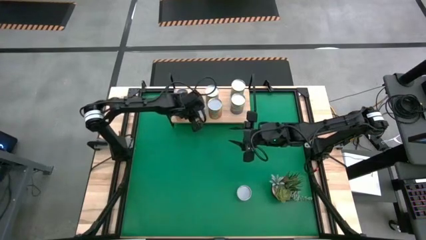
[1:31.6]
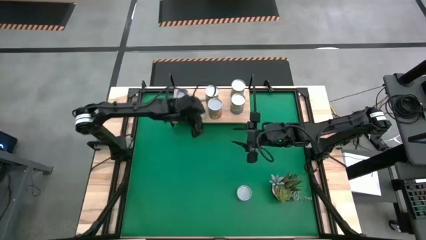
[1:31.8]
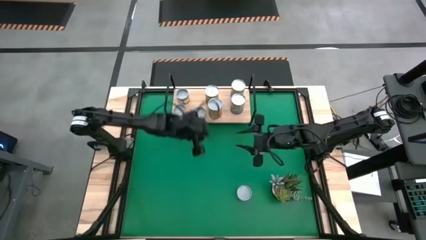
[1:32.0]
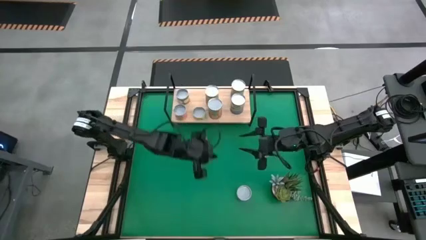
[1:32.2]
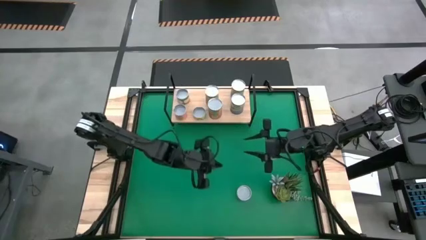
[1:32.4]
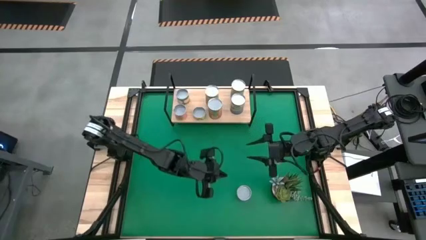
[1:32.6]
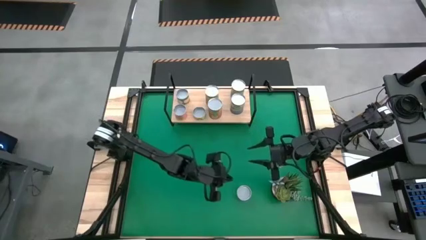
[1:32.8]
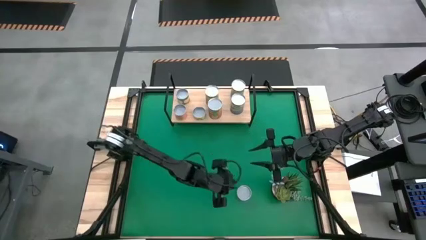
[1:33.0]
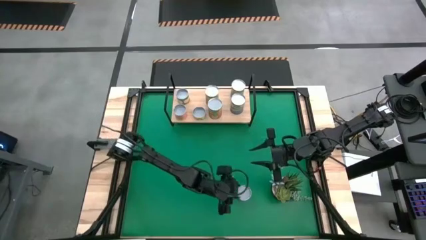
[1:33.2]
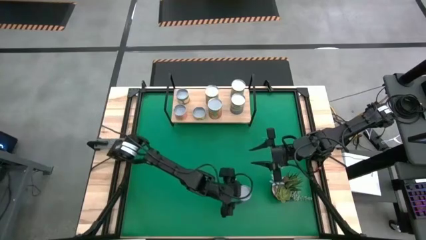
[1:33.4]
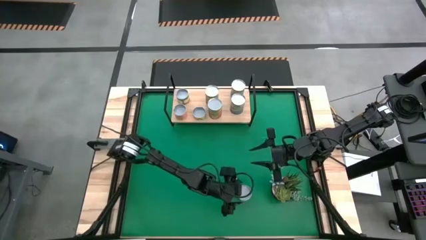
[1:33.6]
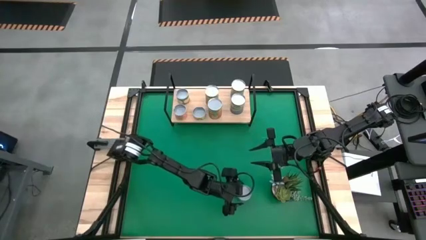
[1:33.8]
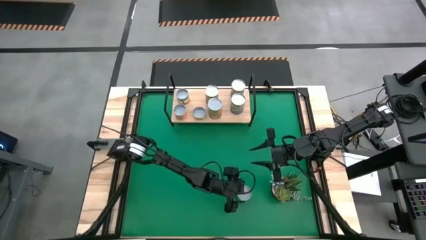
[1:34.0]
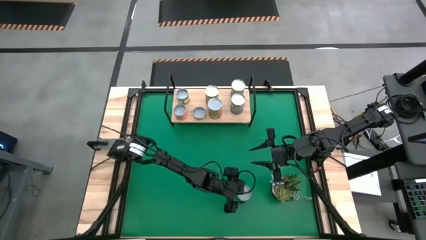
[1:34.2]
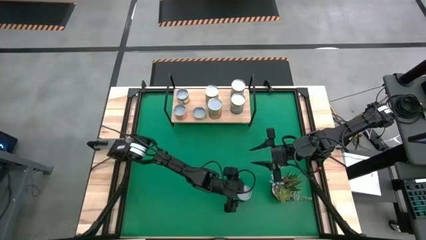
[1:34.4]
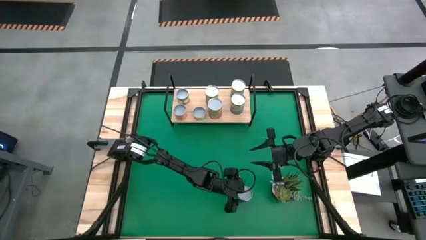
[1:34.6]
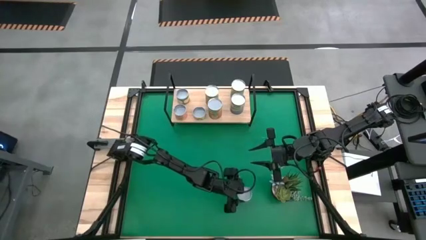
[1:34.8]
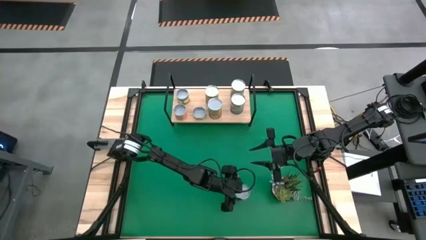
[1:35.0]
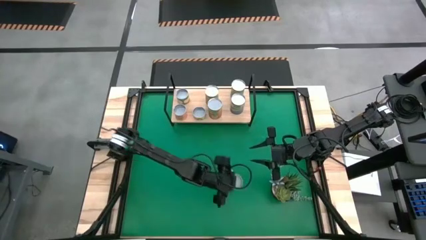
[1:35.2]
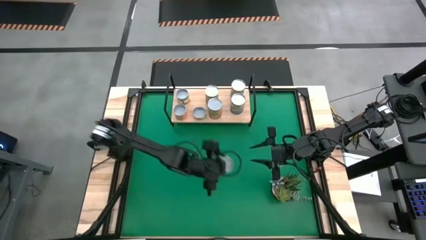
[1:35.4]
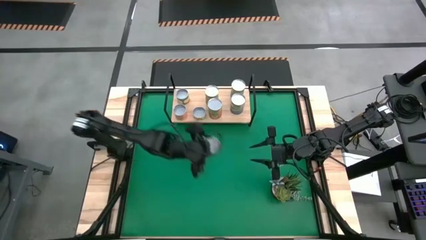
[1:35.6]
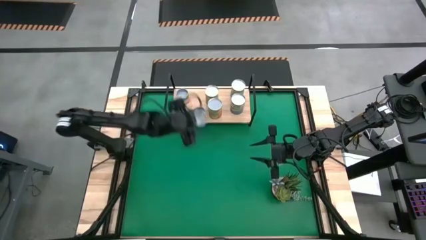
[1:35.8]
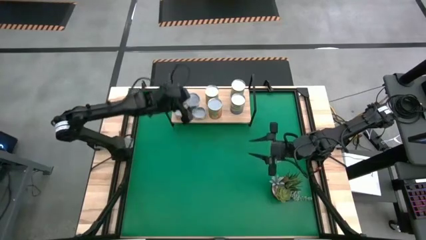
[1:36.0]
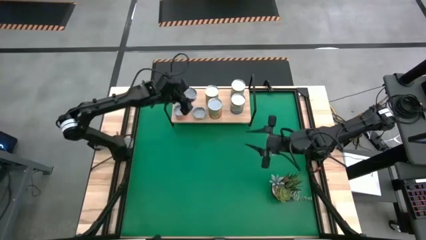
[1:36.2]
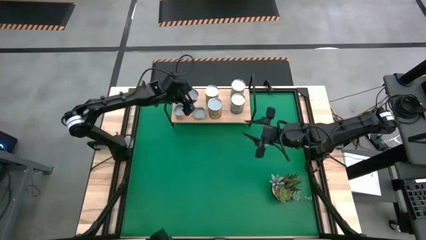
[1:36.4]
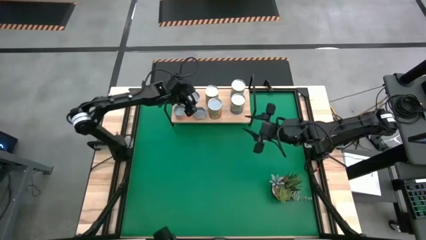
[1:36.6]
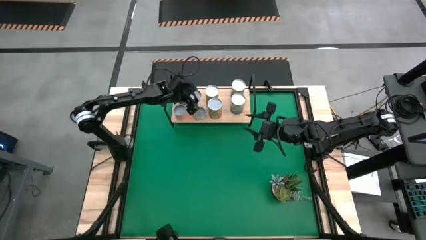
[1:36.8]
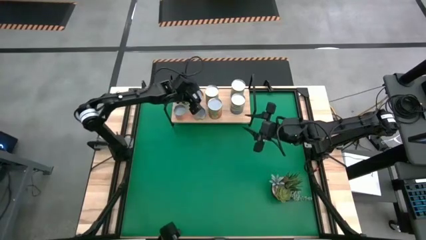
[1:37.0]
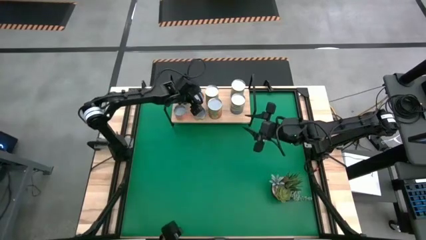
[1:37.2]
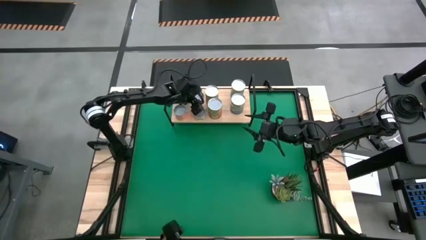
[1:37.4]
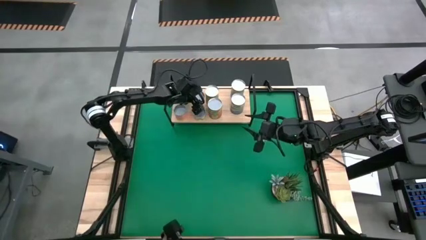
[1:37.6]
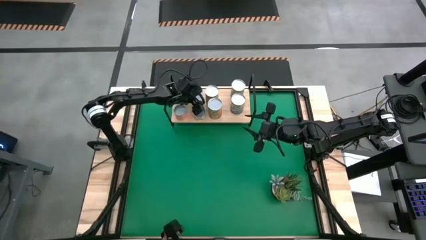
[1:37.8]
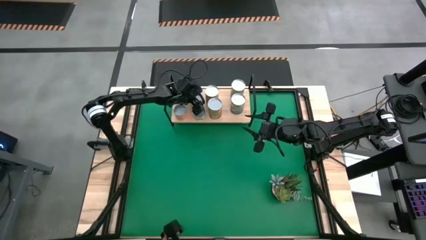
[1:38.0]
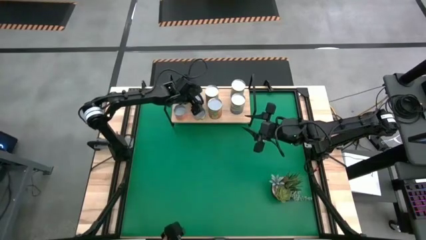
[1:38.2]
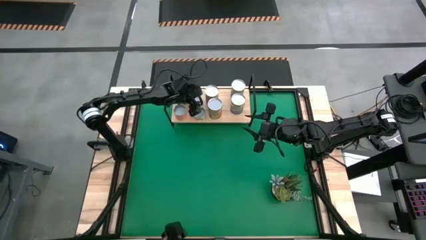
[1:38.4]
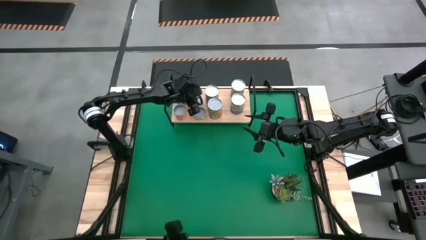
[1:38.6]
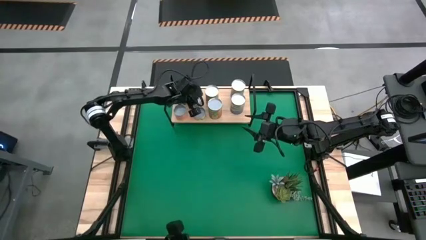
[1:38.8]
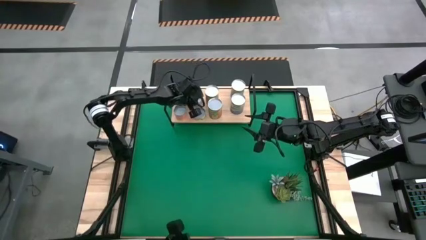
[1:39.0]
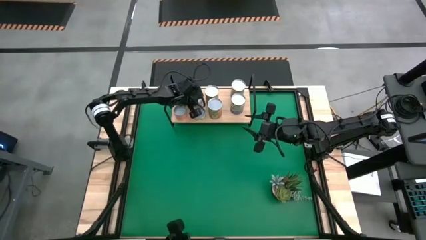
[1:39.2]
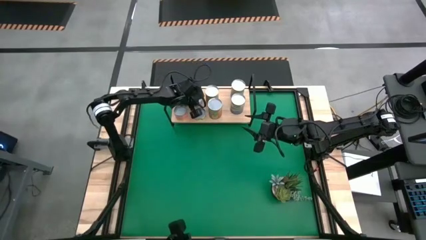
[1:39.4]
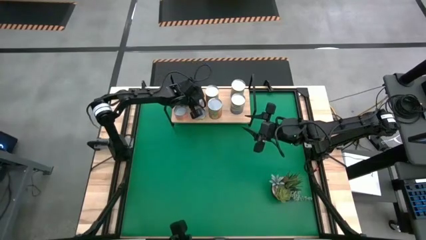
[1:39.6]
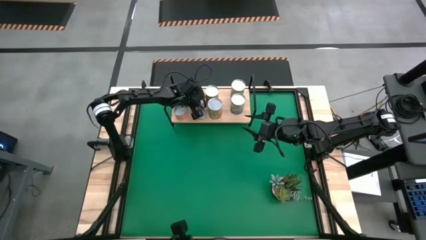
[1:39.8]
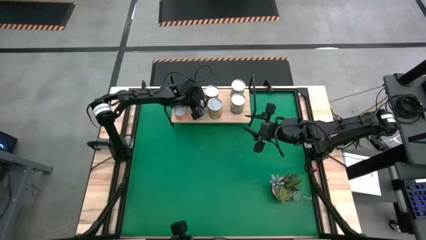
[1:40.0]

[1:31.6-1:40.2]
Task: Pick and place cans onto a shelf
Put the canned salmon on the shelf
